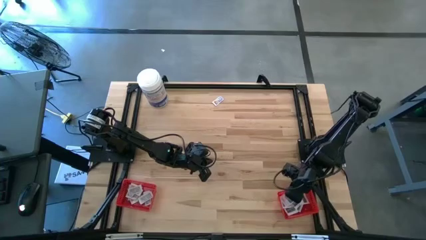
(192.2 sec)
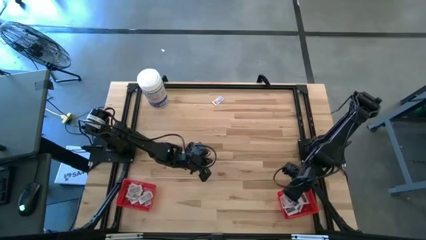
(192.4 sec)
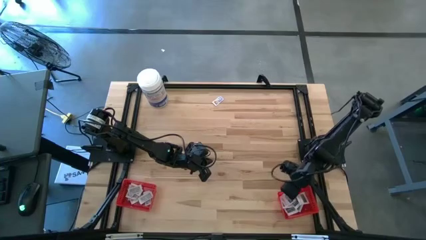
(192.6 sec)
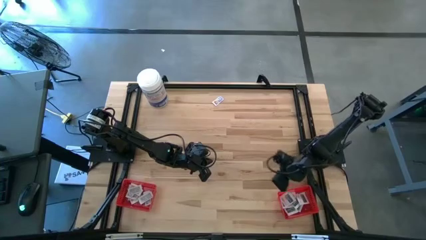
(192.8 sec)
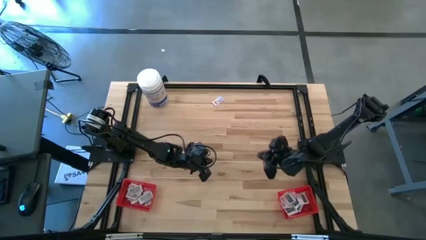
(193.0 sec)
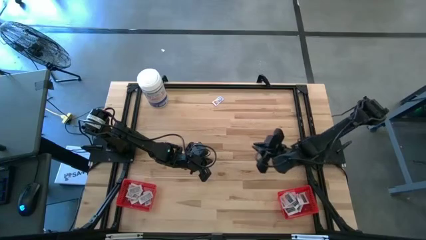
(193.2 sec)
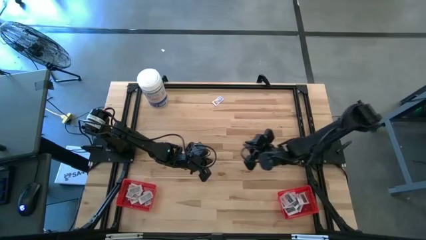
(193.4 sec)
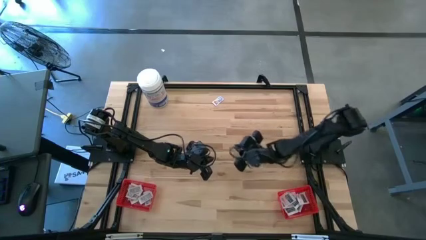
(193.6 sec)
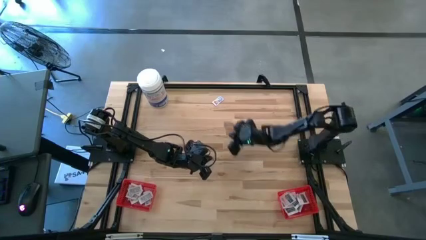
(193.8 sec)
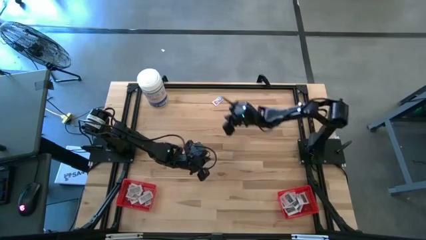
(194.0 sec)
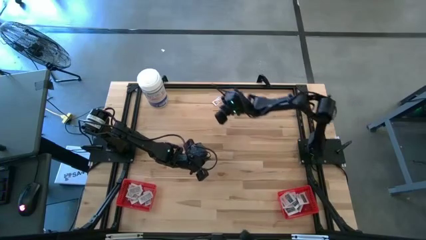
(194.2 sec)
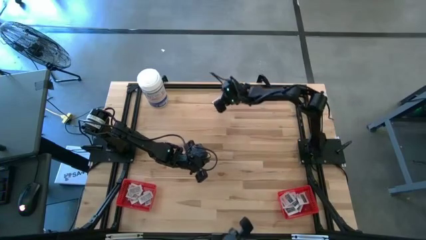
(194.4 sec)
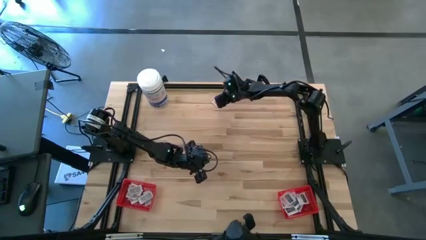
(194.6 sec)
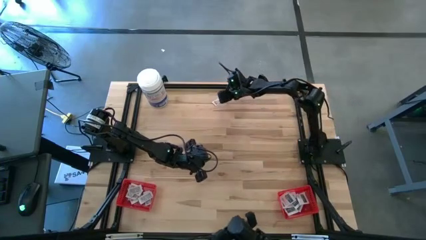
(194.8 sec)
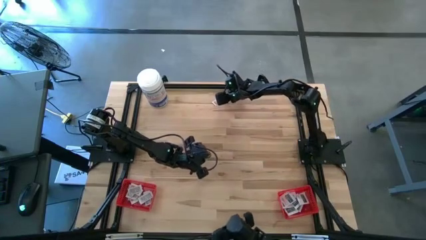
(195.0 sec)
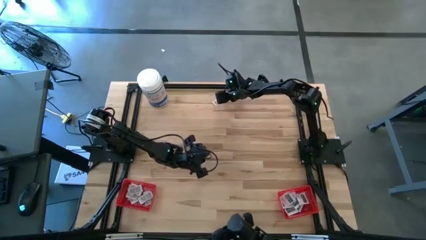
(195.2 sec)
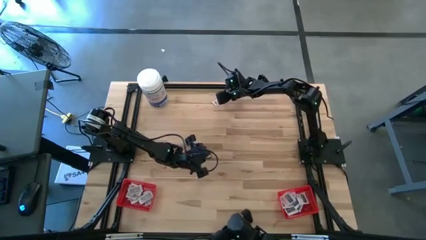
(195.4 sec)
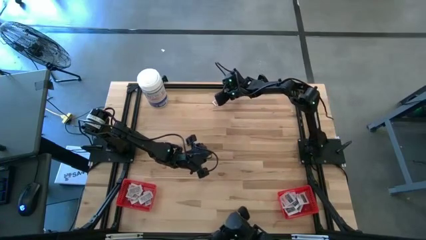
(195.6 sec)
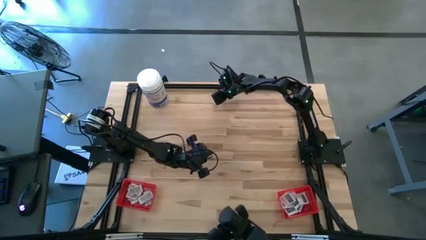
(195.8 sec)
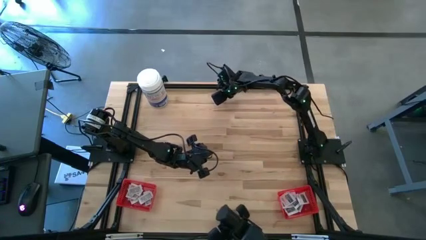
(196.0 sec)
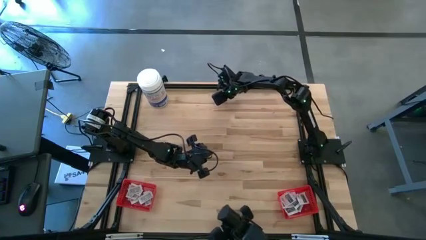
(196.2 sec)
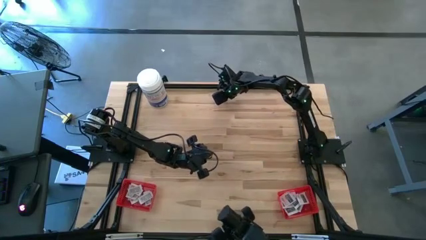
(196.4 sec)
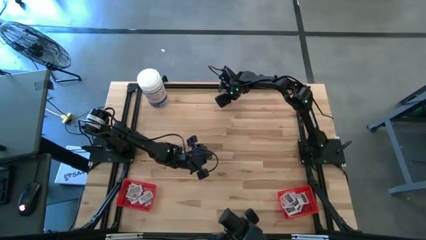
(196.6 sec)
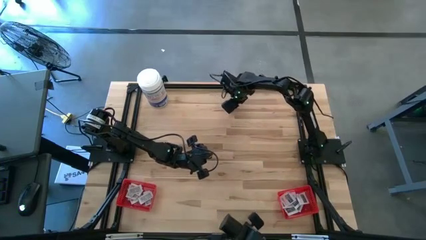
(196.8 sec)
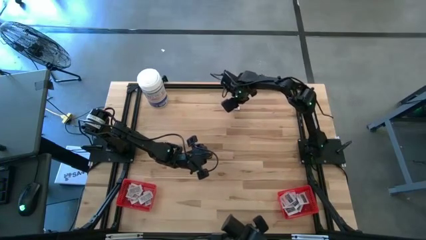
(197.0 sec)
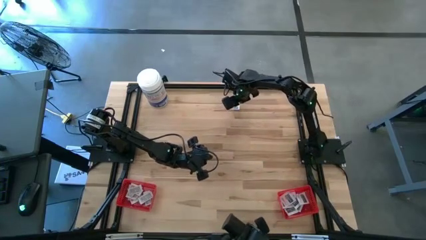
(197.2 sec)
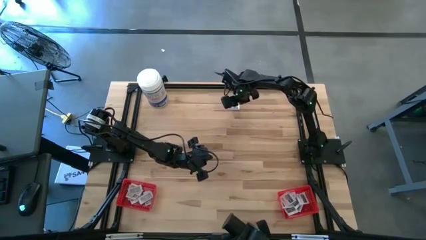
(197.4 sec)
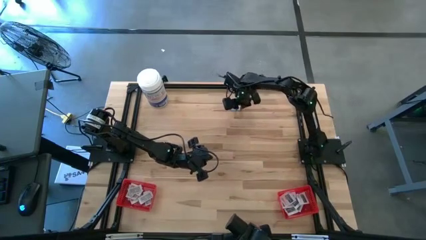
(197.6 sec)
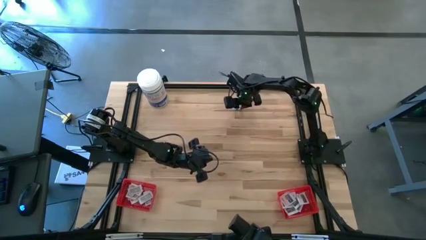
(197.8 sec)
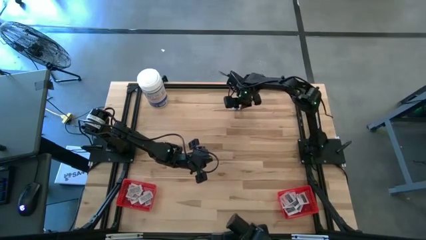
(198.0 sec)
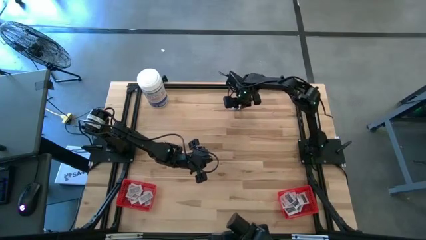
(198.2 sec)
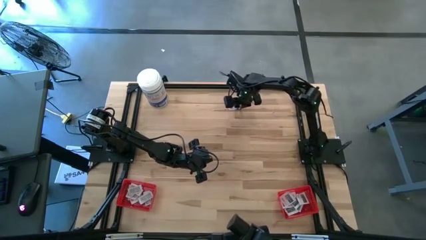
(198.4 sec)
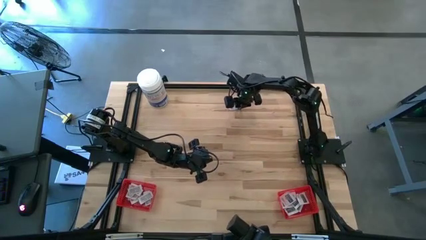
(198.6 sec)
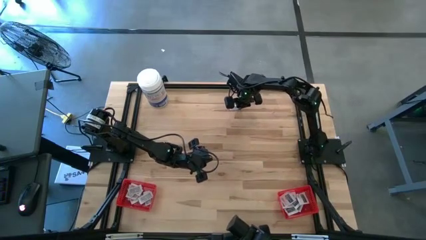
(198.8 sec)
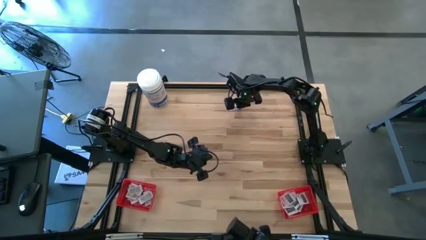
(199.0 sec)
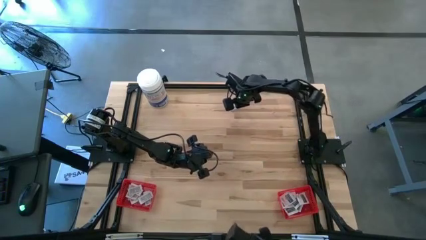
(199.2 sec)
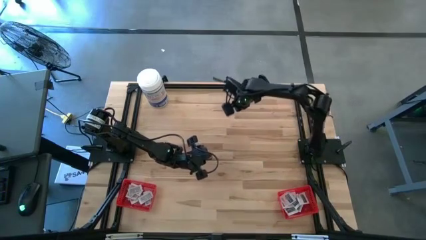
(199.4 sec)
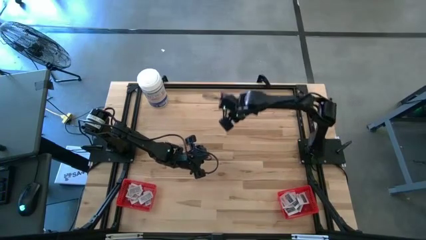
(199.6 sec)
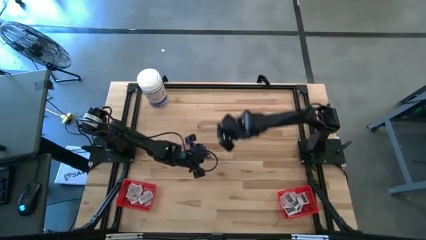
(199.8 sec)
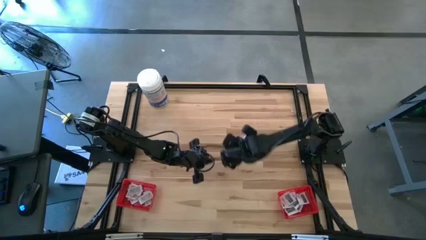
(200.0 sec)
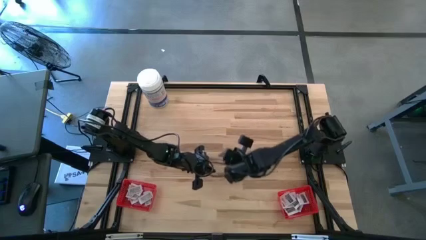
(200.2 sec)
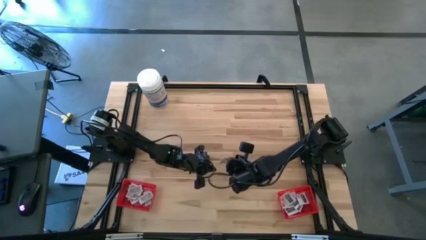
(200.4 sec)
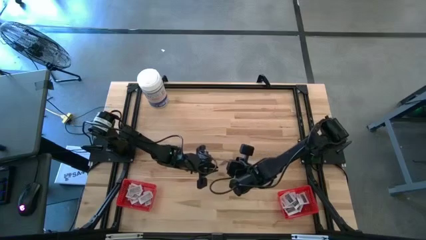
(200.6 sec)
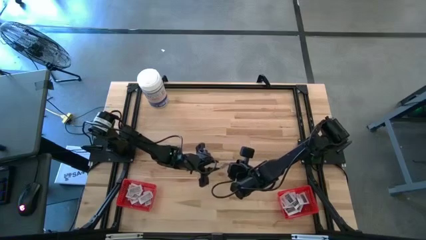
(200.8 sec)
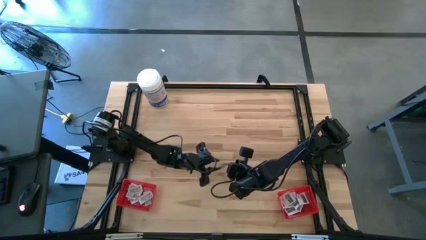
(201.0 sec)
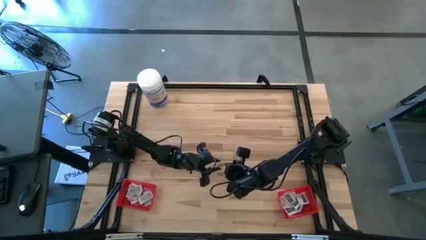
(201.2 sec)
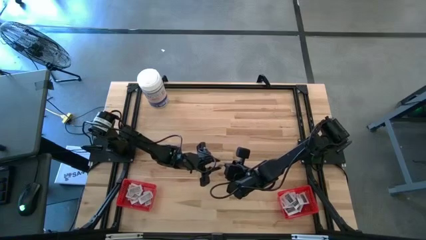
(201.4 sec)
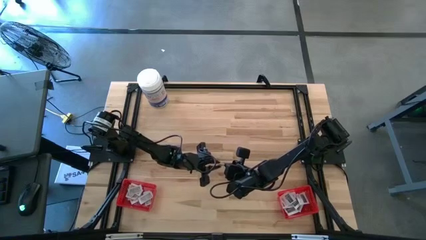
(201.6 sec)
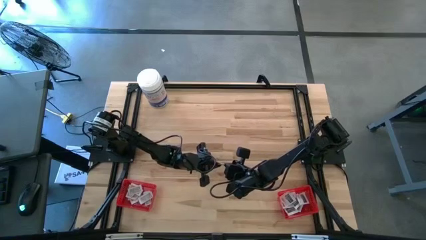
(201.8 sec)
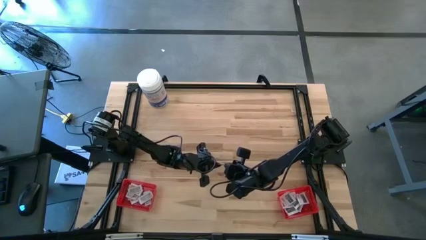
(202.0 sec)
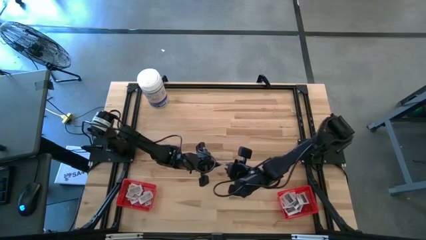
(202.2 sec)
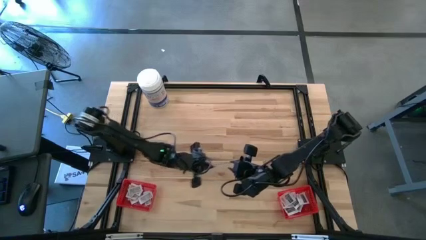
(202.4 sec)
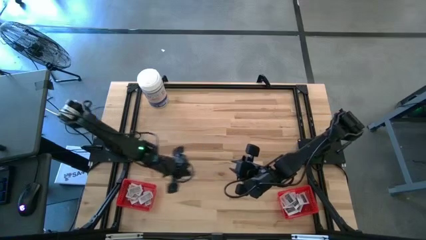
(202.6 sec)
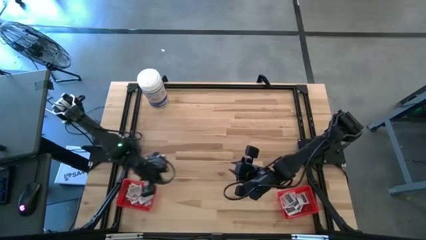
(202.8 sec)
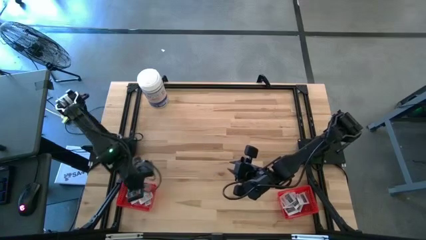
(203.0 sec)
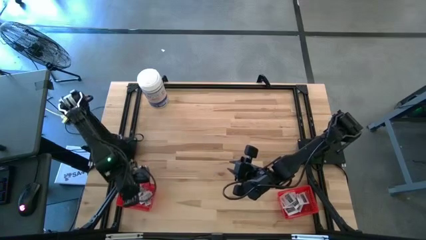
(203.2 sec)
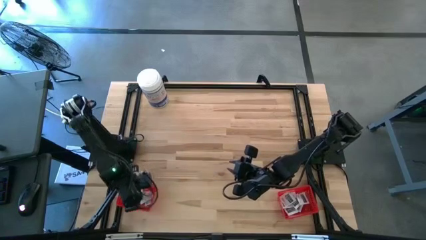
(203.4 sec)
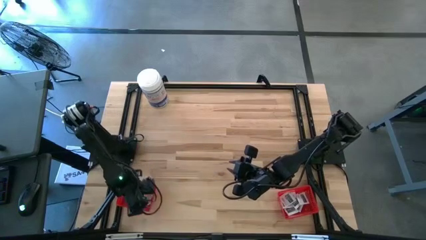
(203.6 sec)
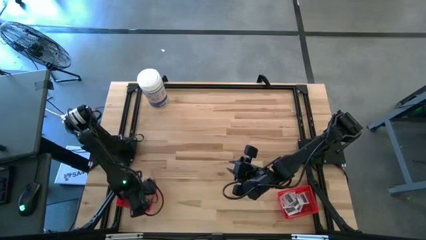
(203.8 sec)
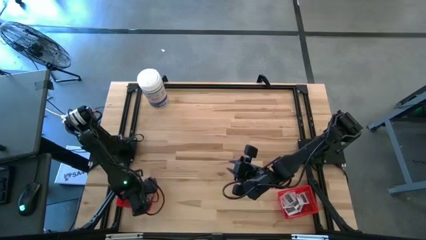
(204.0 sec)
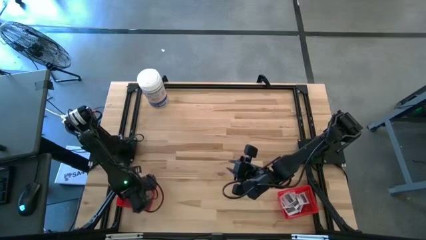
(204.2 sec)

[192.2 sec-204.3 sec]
Task: Pick & Place First Aid Supplies
Put the ointment pack into the left red bin
